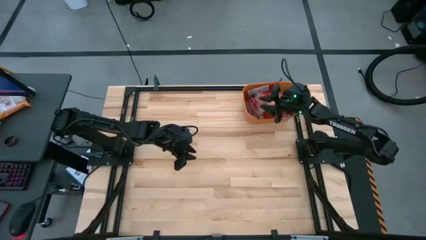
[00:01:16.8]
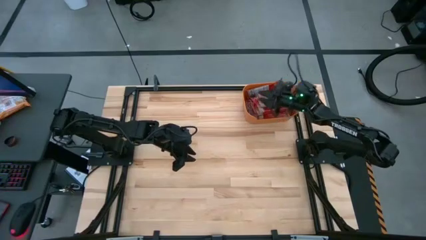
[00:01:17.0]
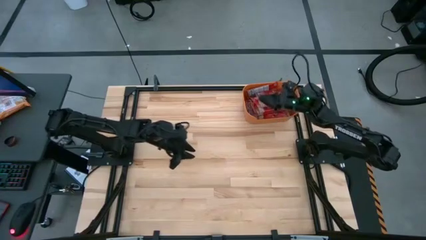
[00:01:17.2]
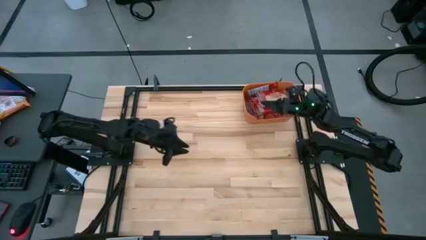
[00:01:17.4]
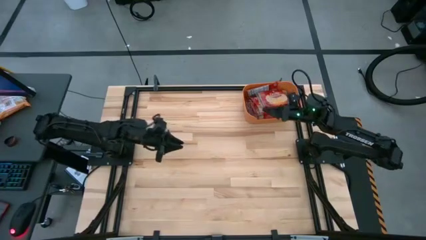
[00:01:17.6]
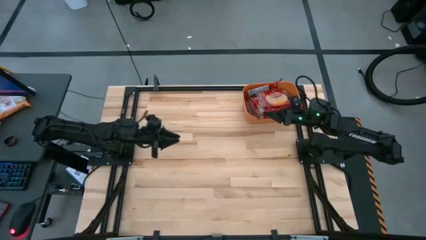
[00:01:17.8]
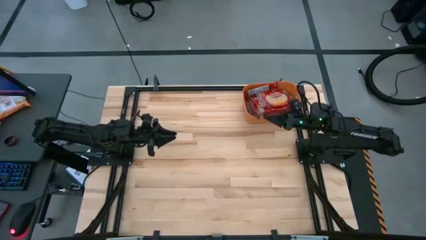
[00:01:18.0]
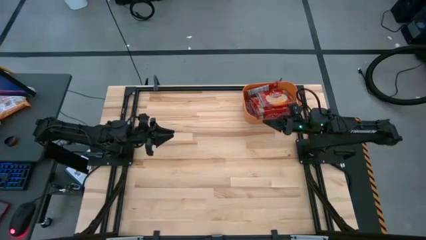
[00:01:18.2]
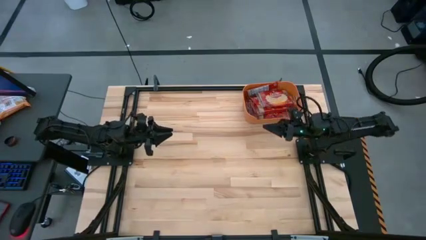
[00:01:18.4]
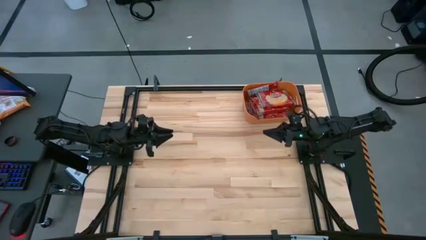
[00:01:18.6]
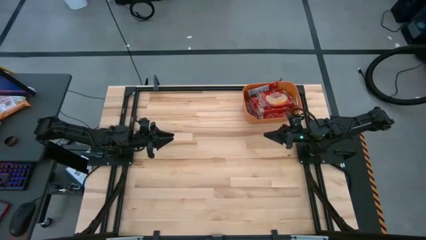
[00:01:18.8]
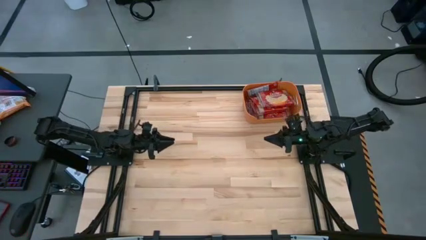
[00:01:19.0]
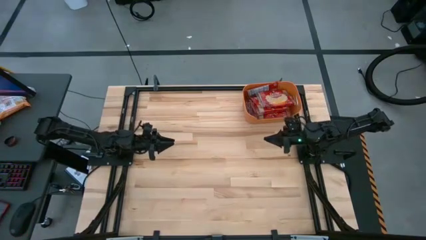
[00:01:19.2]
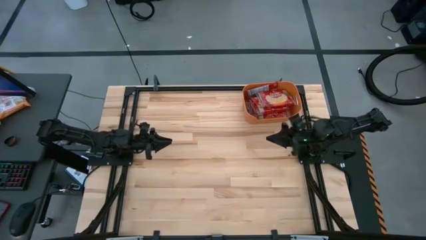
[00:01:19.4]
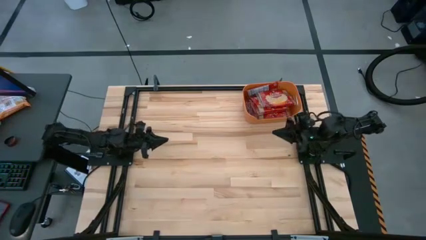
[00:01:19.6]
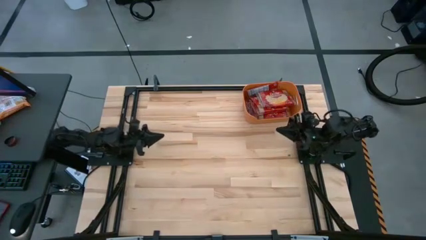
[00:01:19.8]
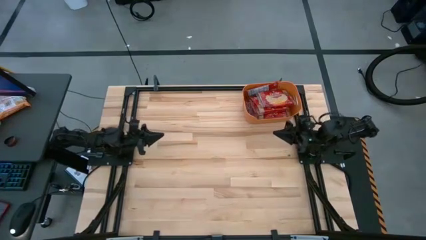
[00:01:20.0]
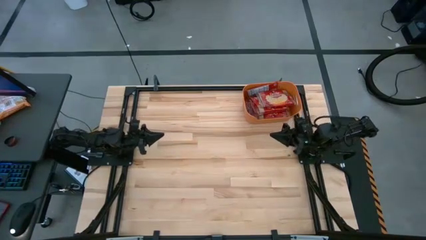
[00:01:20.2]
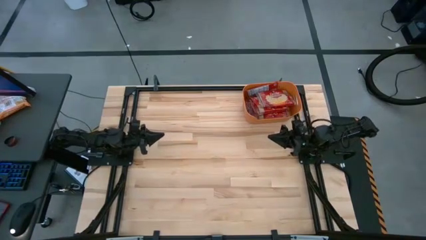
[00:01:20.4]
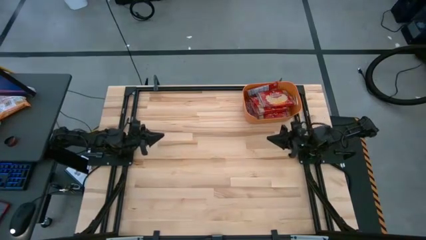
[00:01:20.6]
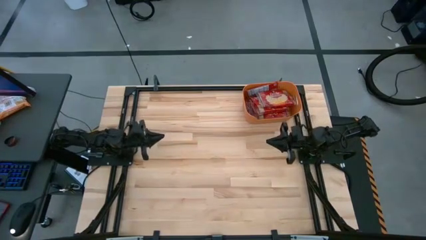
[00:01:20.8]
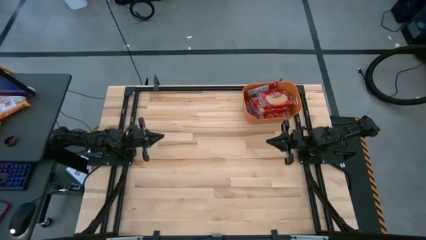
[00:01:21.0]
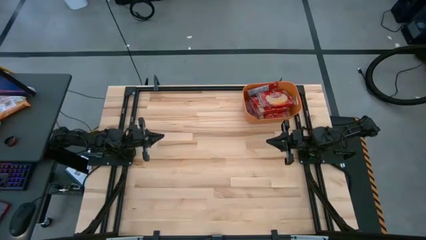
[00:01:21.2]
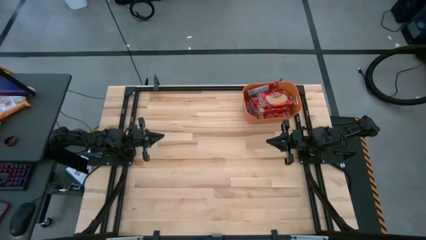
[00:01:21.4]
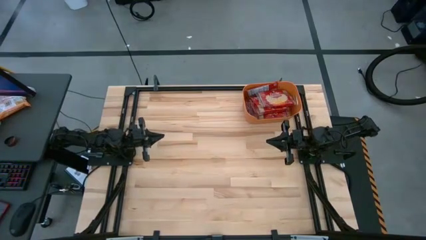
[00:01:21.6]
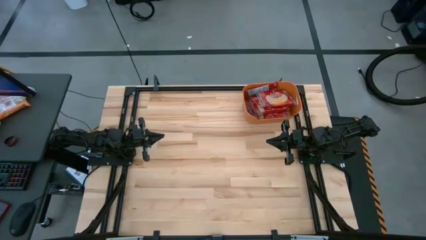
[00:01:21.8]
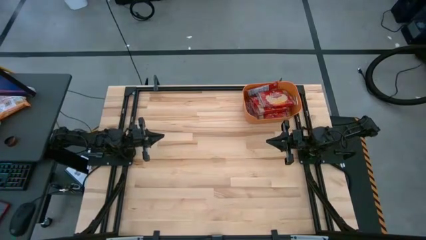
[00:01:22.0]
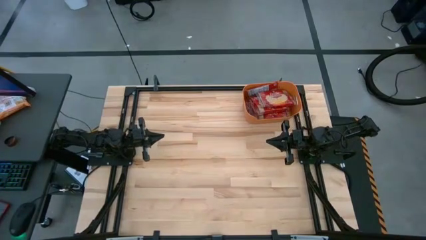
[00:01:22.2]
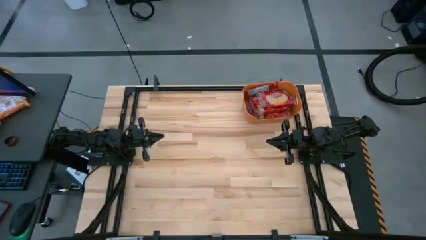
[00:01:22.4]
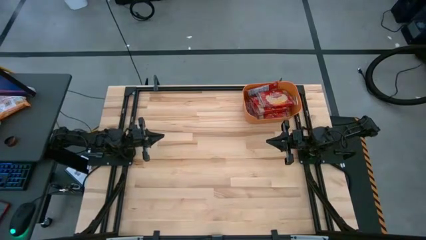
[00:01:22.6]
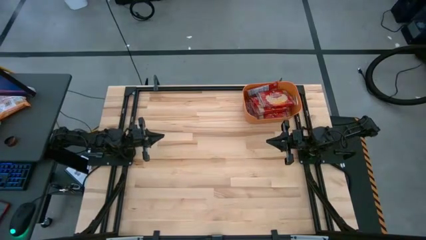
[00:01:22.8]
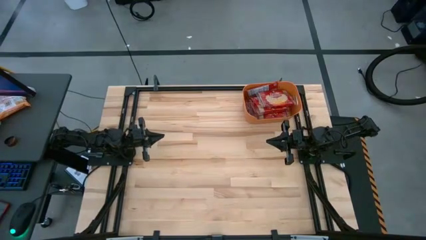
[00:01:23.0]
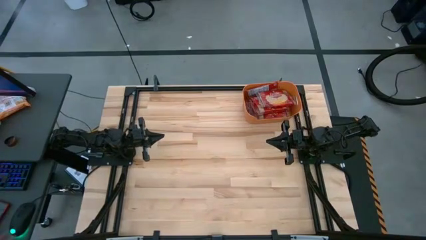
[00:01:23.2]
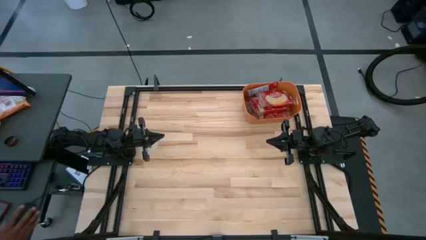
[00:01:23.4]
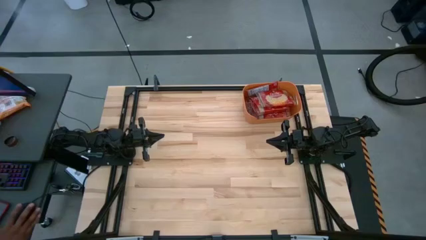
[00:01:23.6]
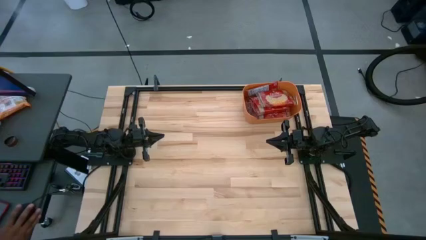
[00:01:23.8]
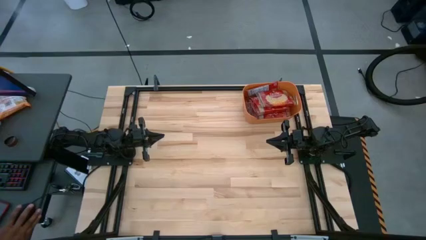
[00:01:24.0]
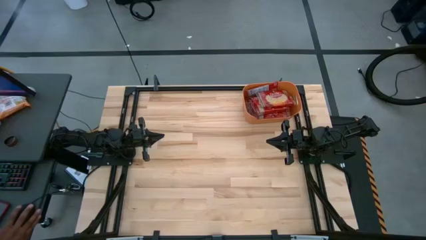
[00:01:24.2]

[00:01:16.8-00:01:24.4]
Task: Sort popcorn bags into baskets
Return to Home Position

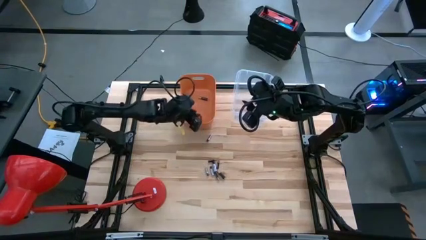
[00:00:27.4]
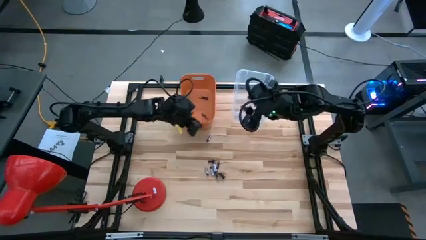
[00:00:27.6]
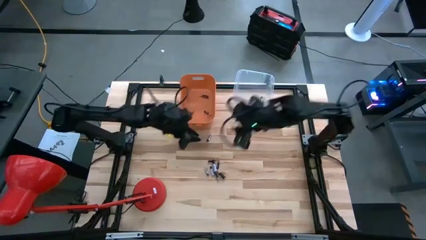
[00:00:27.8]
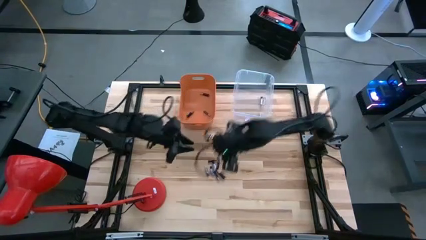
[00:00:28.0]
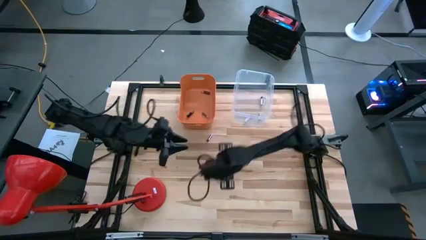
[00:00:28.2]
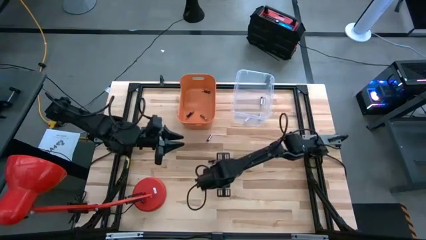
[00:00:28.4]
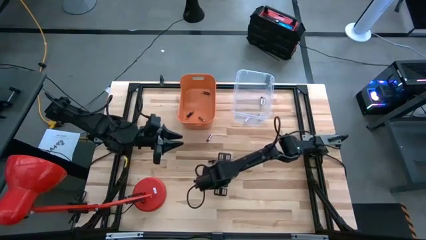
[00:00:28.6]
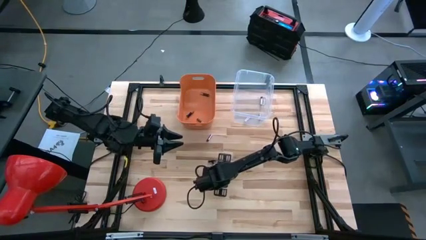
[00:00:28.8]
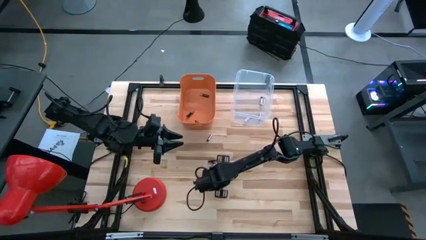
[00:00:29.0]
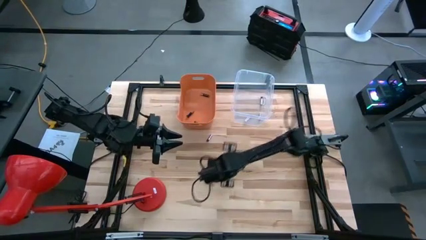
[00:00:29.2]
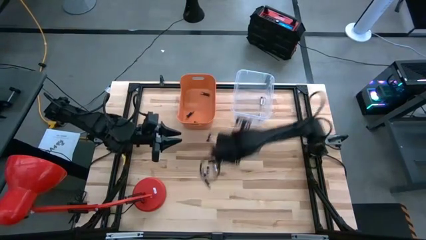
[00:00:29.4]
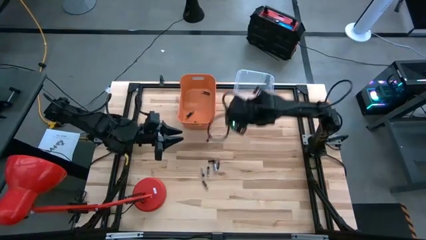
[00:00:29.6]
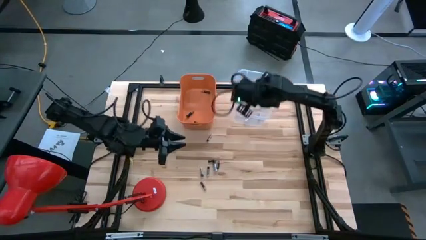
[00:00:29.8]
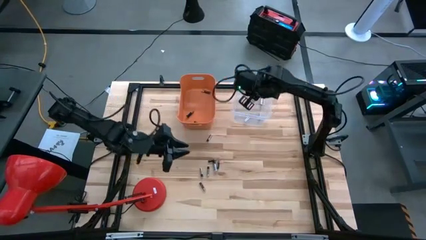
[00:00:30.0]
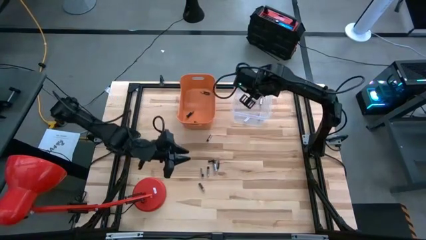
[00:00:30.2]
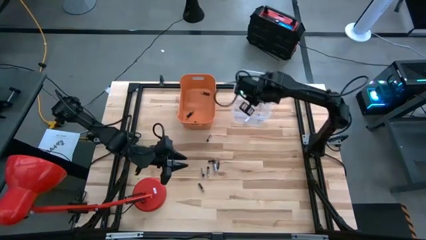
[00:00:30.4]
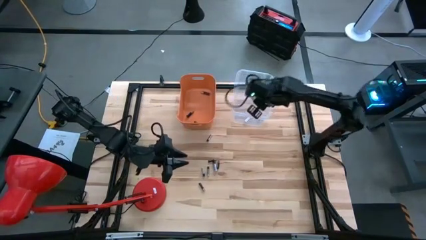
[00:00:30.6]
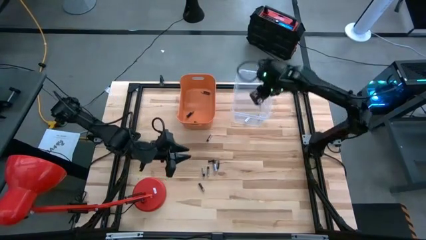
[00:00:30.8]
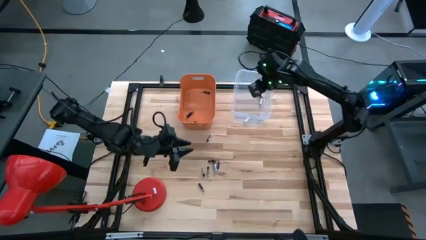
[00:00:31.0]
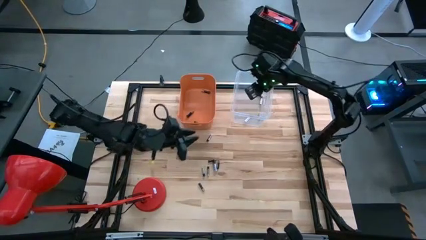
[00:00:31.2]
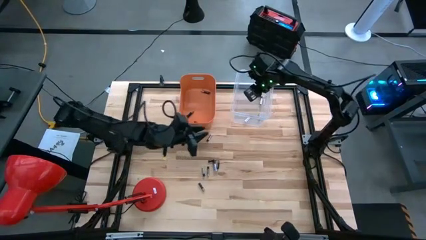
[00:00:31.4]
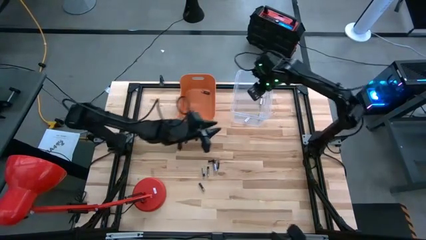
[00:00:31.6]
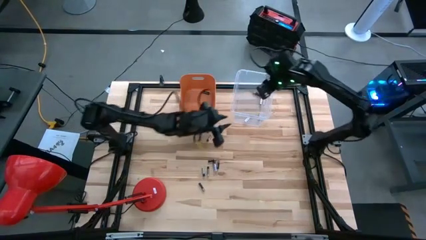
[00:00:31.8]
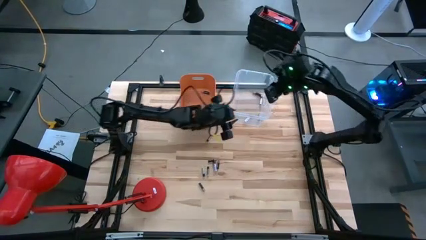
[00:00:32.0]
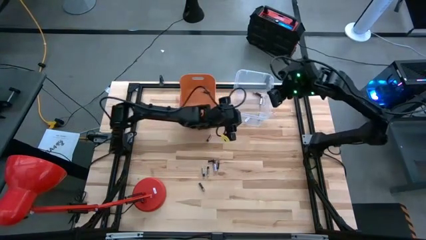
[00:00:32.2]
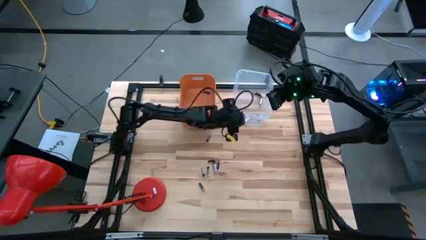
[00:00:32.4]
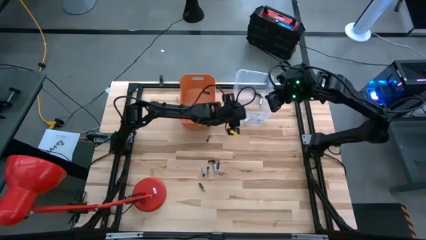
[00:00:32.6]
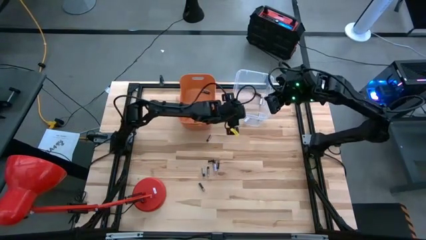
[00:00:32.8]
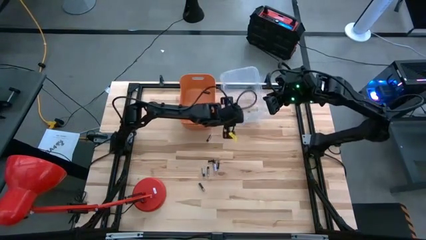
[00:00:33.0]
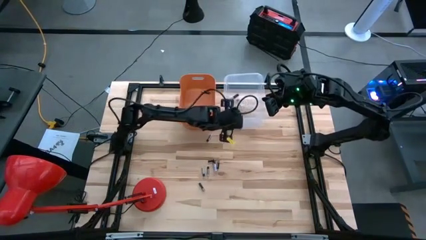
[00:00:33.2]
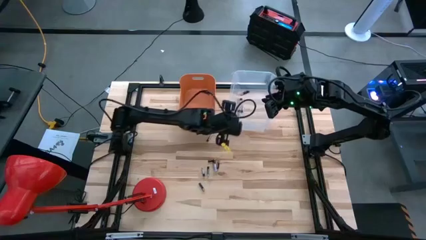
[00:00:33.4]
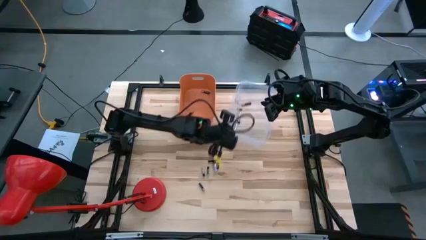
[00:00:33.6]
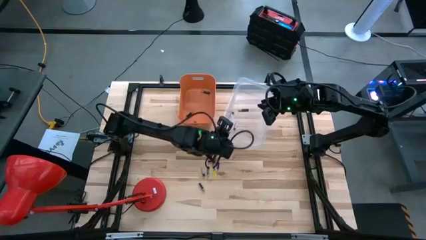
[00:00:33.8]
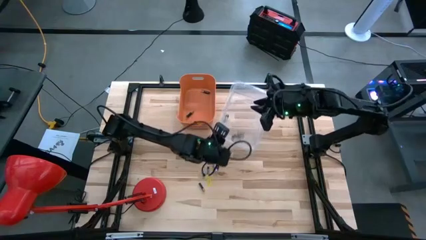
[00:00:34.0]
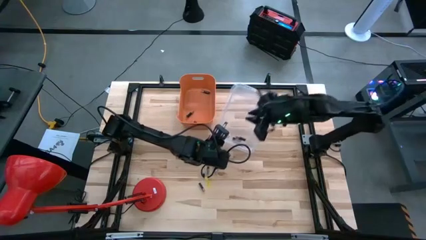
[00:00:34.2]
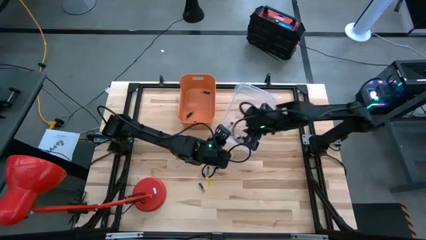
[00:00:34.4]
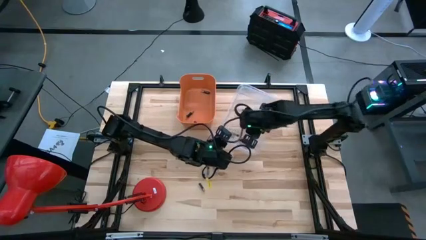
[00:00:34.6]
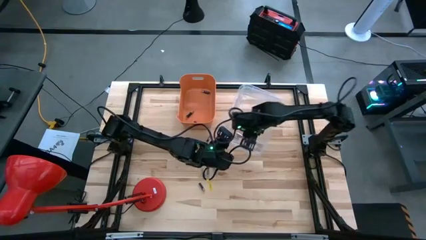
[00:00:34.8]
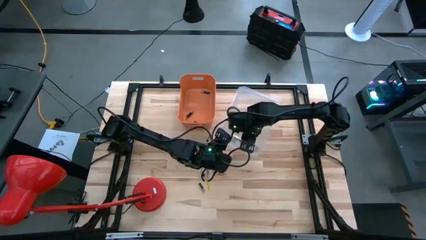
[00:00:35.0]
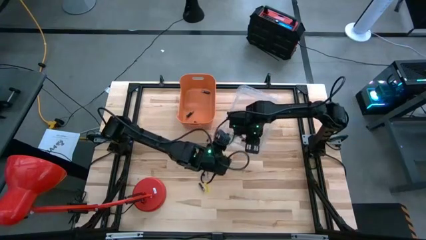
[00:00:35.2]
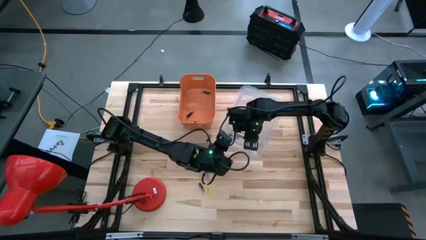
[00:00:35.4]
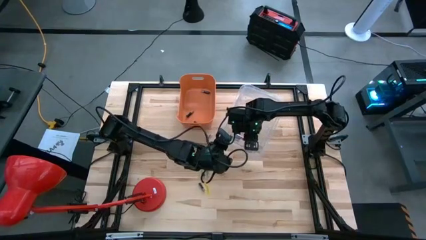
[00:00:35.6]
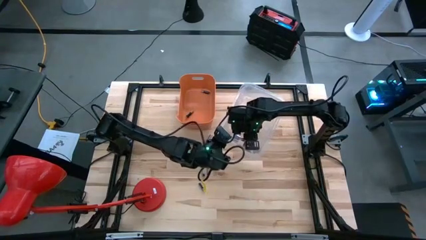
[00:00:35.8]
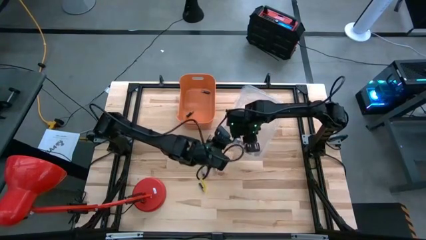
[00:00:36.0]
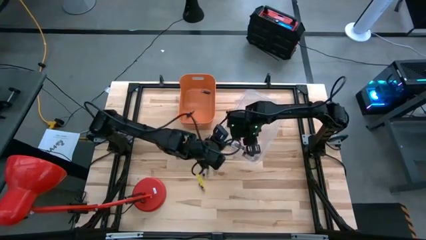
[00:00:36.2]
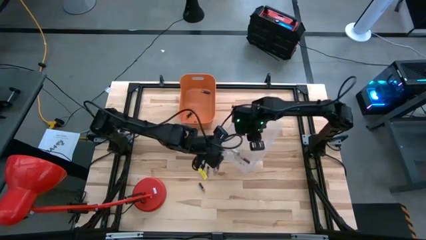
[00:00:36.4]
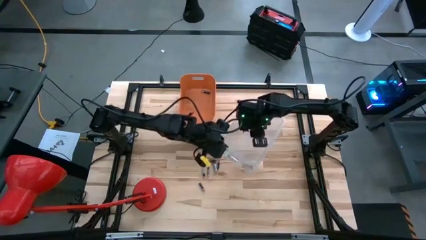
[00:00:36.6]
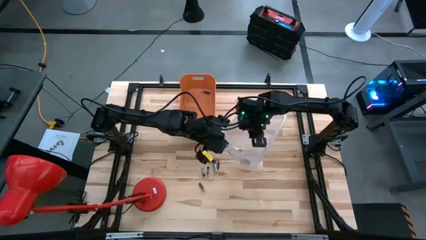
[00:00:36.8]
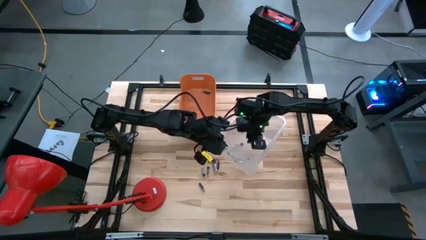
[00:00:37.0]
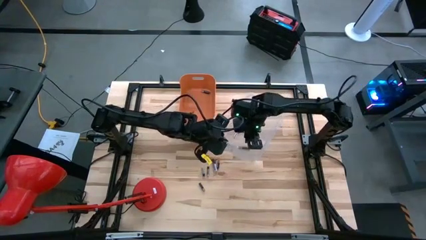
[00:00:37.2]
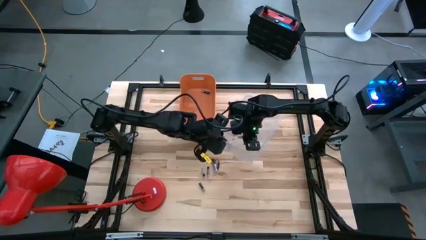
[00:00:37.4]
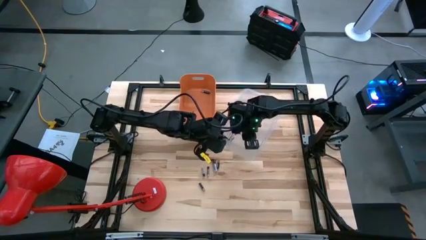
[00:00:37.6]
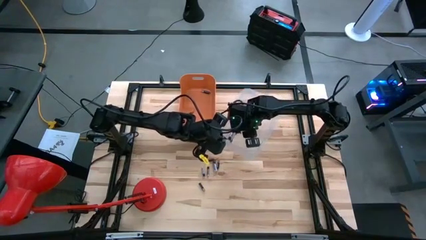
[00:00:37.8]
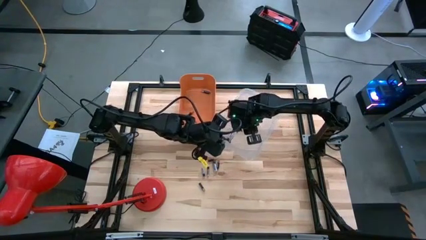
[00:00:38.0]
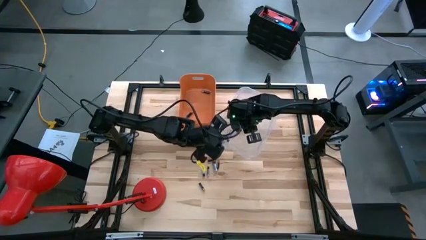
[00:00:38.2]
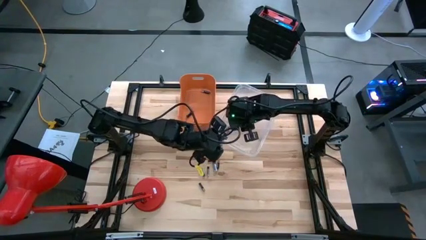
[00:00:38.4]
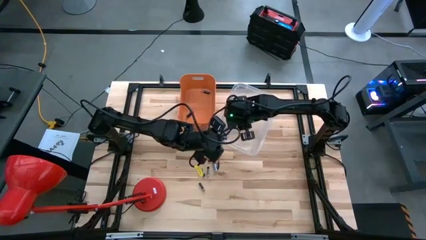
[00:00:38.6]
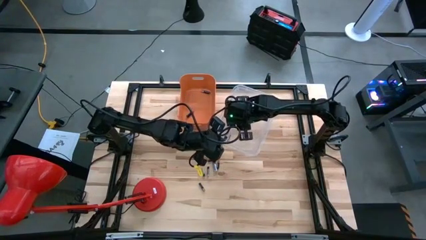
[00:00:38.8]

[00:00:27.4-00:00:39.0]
Task: Sort batteries
Put the brown battery into the orange bin
